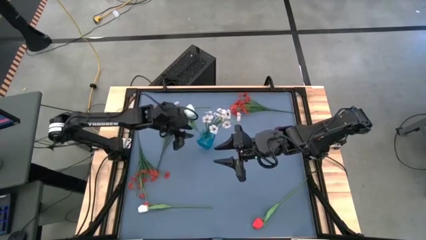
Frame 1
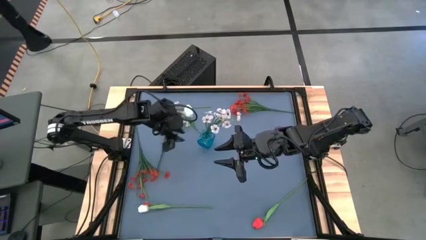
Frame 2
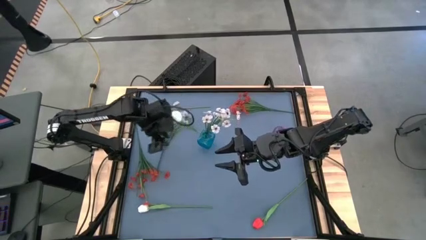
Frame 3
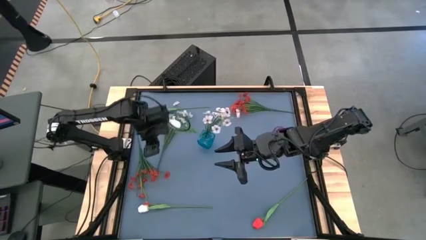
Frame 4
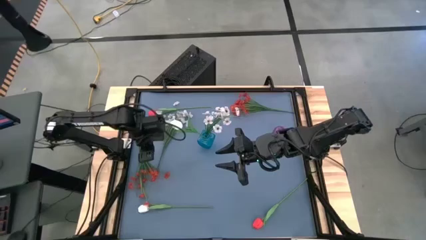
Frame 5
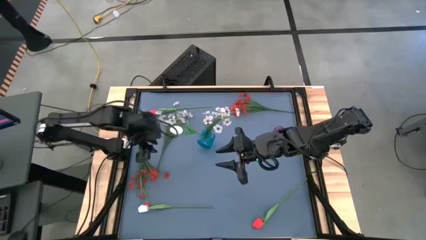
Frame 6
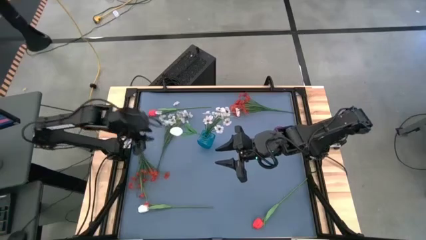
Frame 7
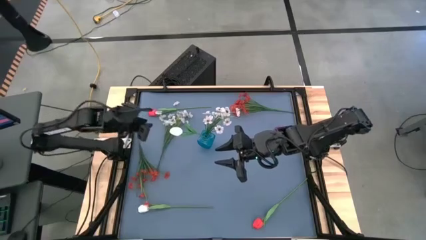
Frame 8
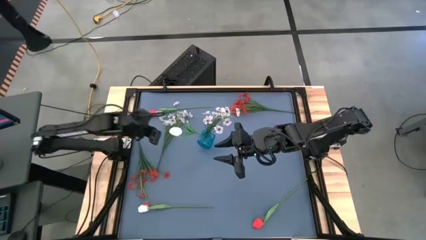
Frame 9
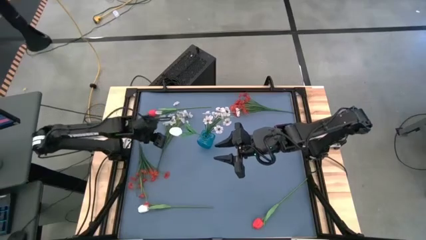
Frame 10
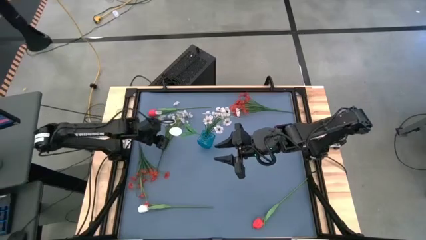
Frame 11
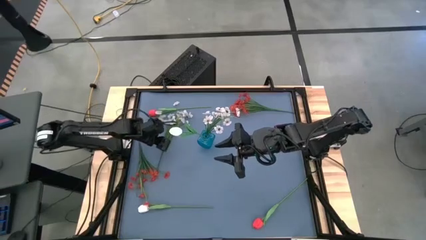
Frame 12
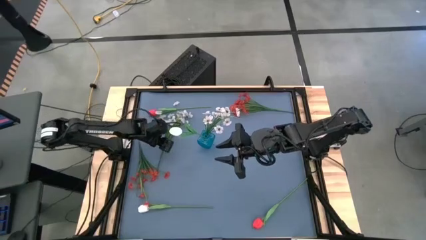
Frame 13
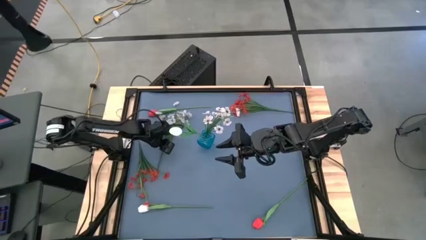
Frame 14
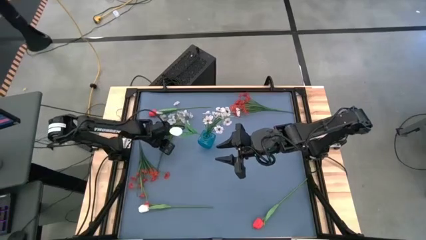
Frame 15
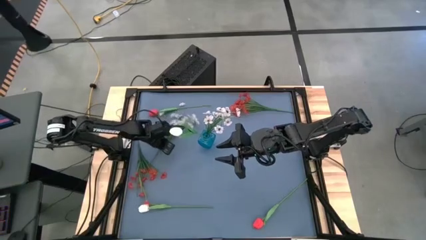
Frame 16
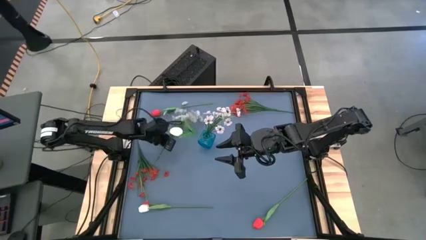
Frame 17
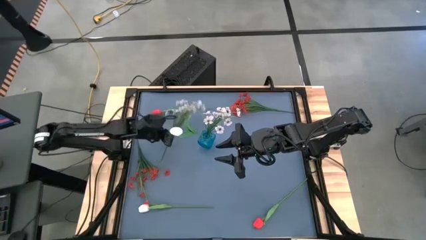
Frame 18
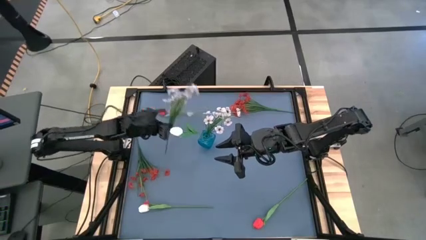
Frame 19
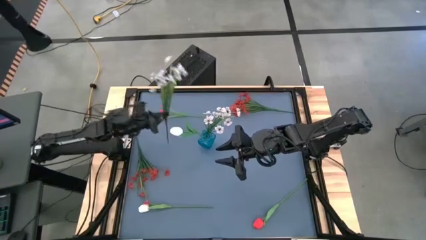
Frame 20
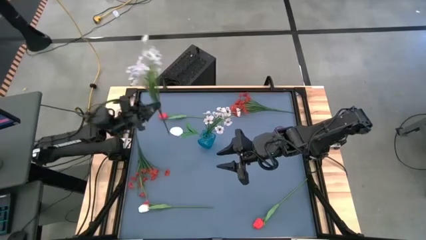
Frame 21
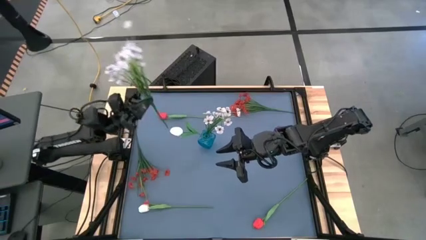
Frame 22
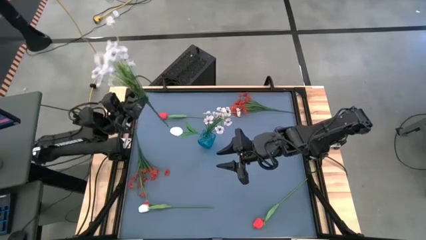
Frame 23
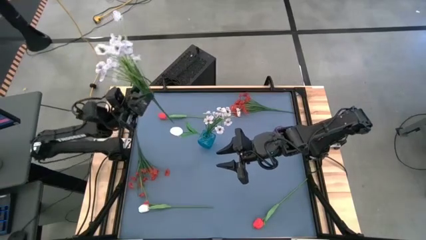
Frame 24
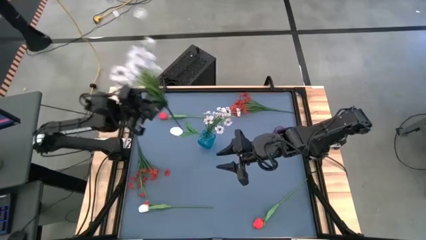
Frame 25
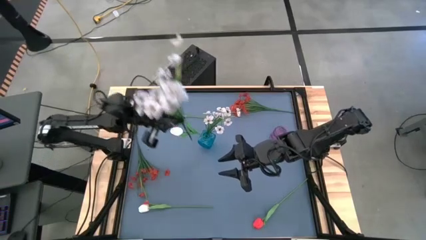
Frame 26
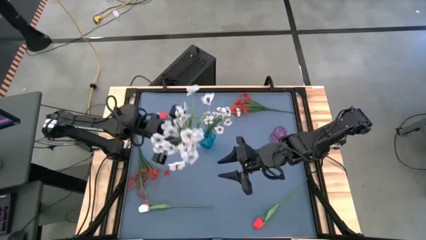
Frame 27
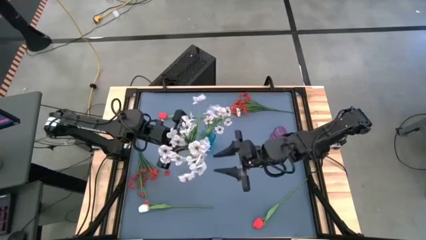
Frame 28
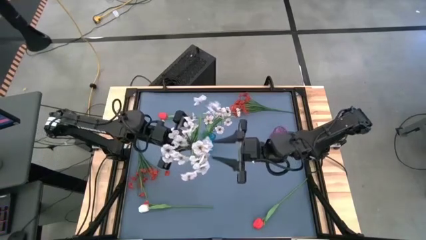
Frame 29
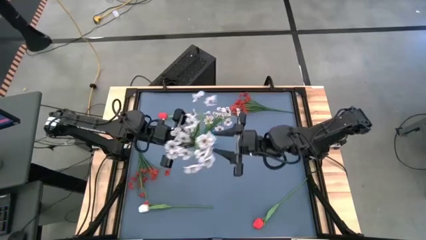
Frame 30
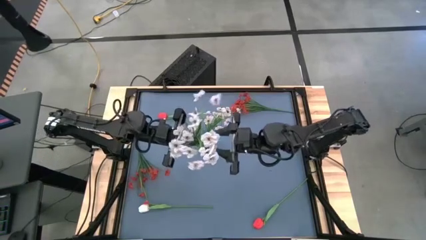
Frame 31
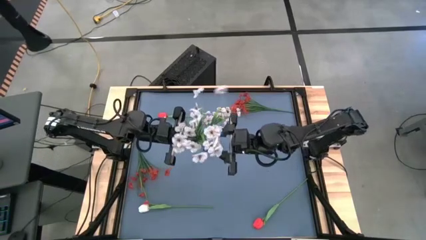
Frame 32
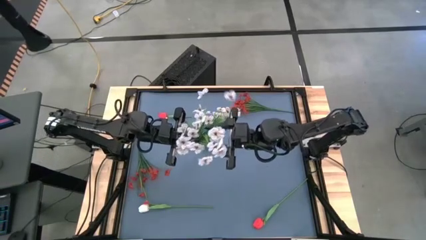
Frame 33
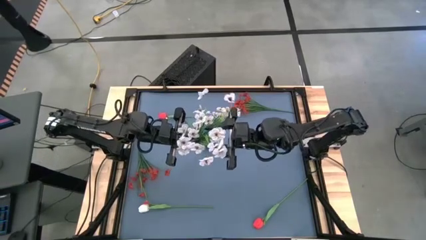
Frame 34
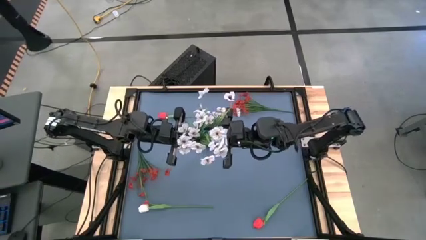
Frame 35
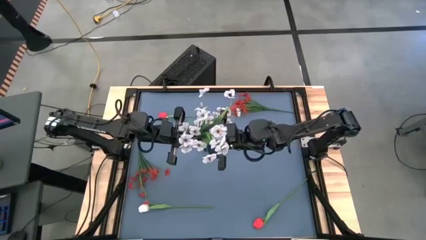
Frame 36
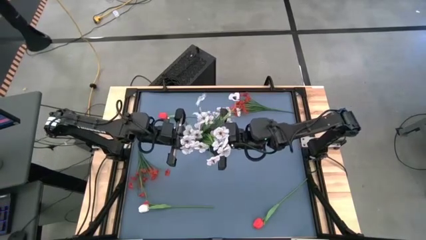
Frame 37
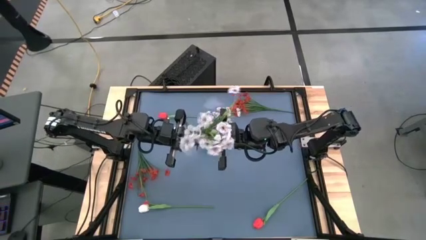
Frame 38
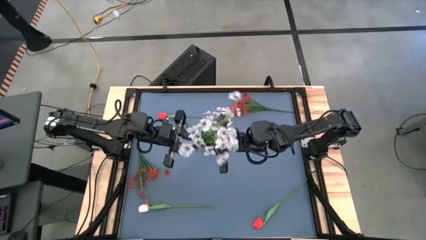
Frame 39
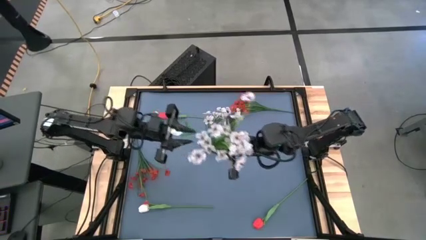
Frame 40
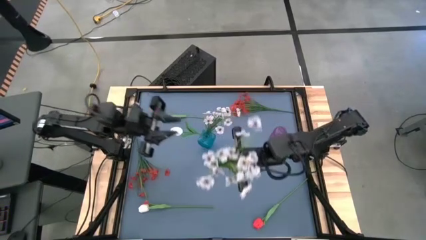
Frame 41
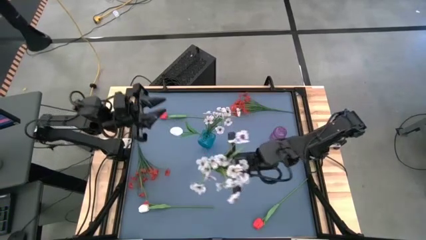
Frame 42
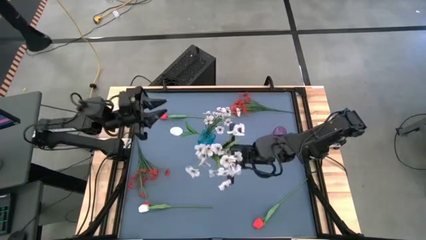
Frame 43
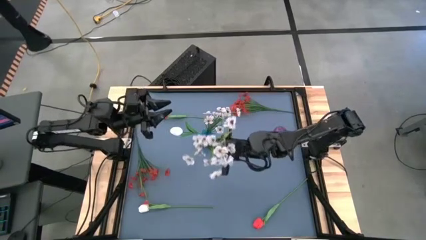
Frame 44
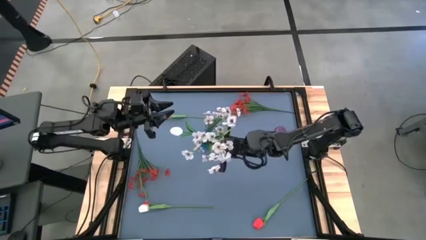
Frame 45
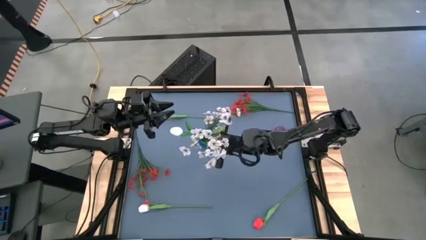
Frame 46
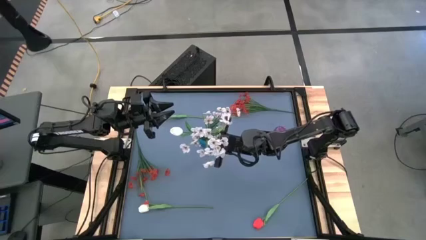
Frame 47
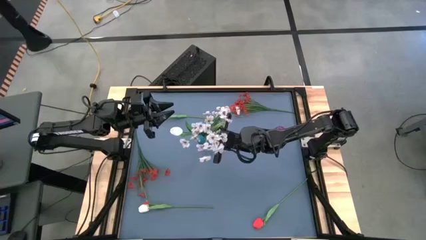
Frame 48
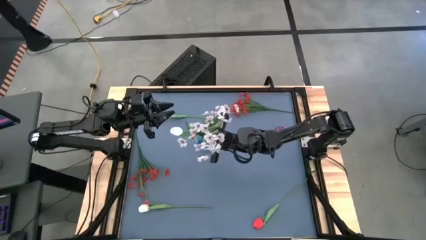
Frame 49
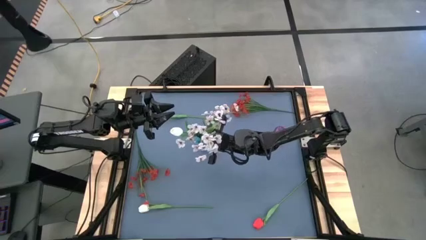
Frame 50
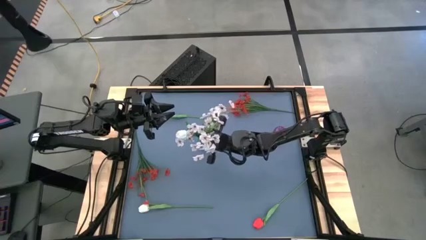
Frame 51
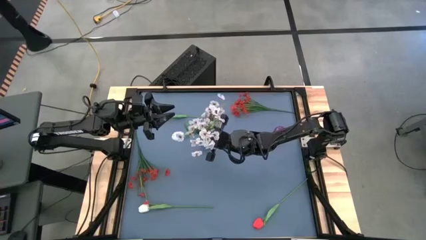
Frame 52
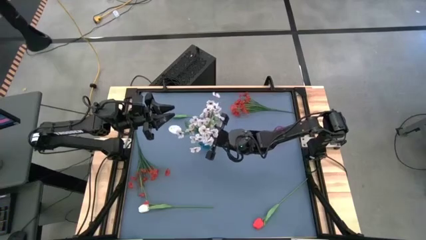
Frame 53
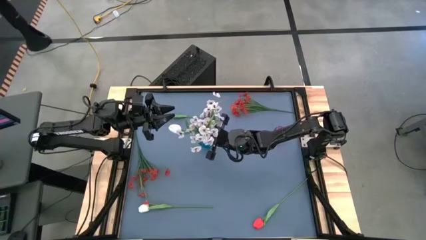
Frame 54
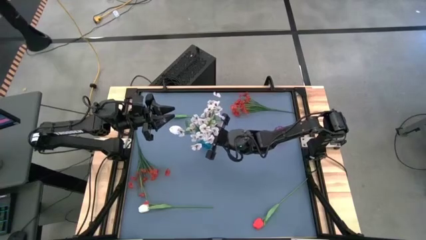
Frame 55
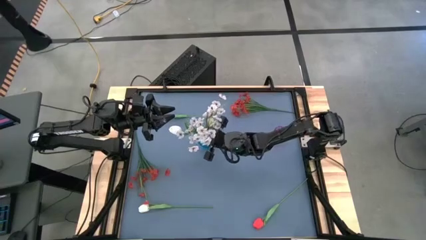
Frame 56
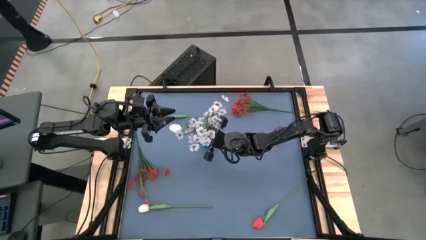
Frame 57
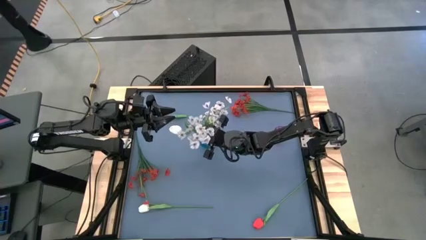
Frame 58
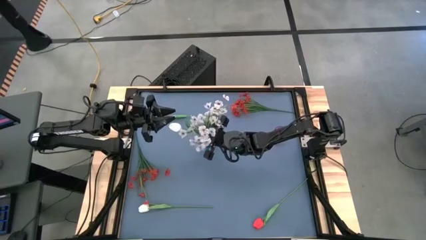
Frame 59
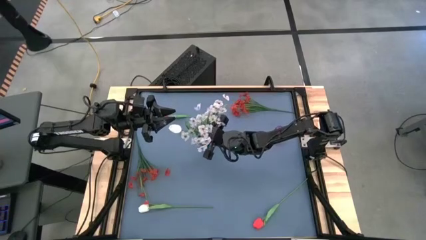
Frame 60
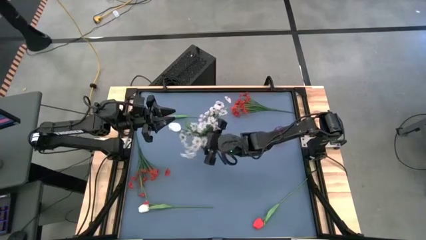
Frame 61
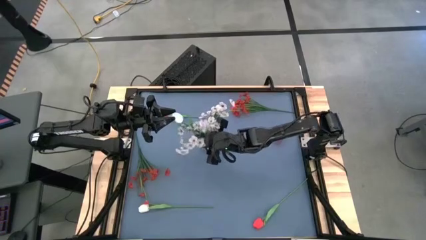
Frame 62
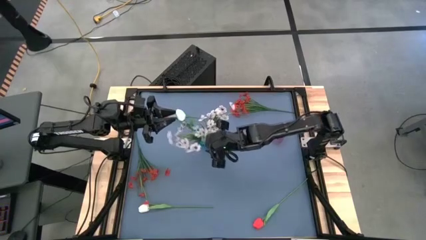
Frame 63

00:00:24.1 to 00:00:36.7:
Task: Sort flowers into vase by color
Put the white flowers into the blue vase

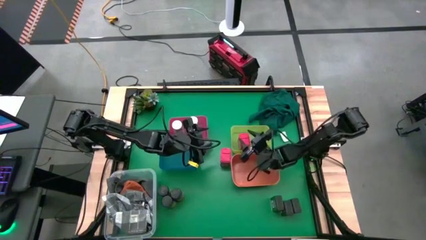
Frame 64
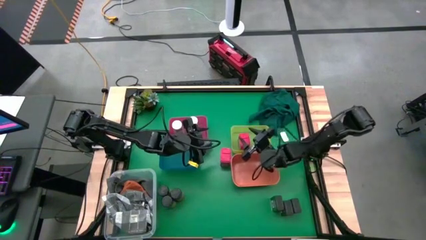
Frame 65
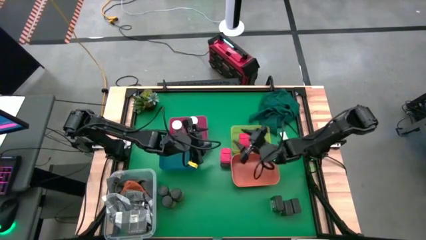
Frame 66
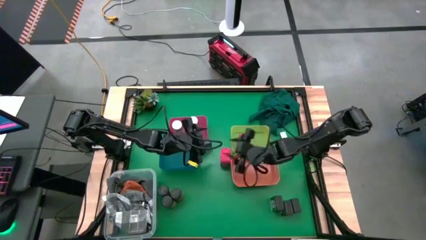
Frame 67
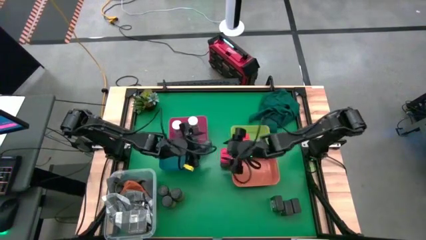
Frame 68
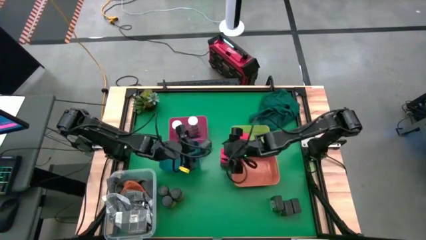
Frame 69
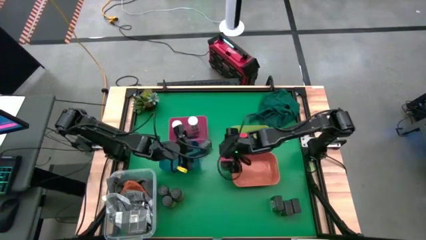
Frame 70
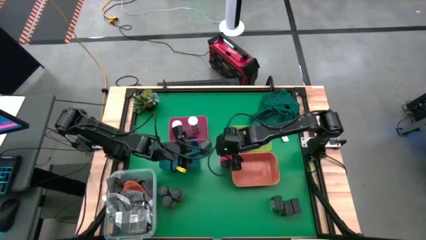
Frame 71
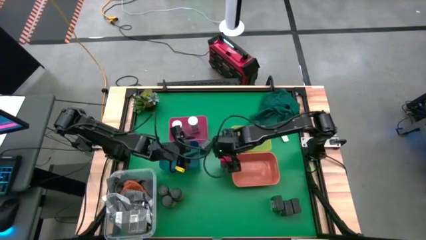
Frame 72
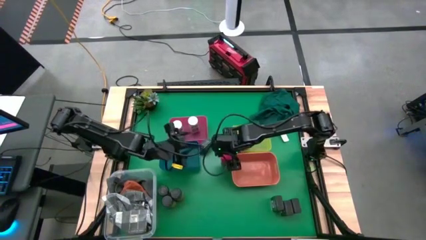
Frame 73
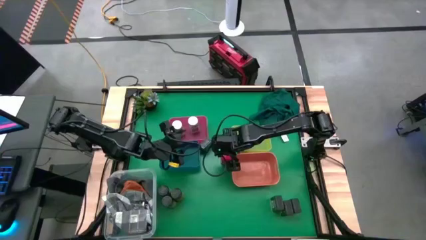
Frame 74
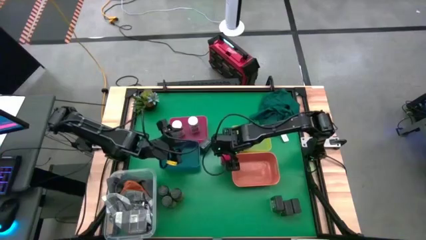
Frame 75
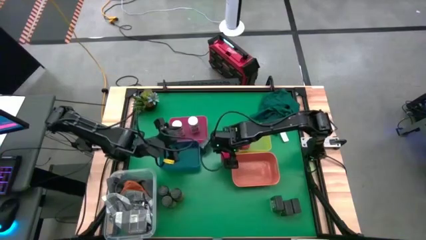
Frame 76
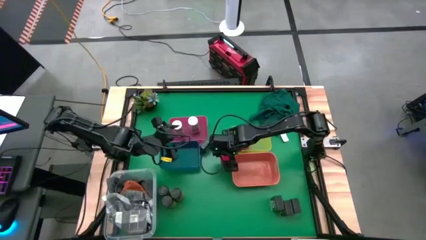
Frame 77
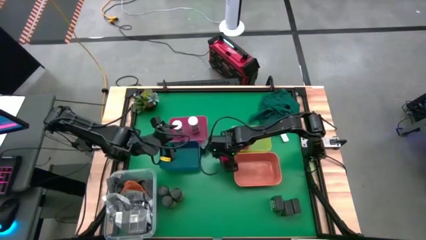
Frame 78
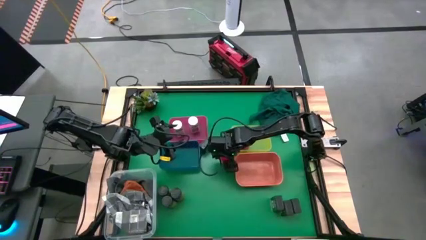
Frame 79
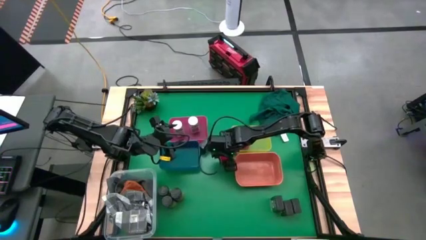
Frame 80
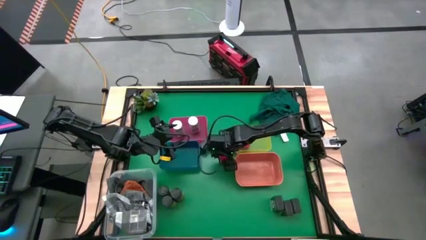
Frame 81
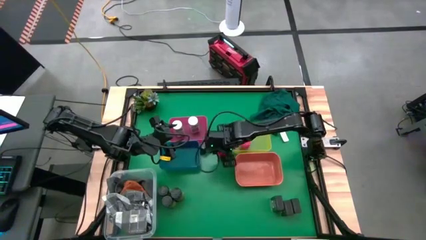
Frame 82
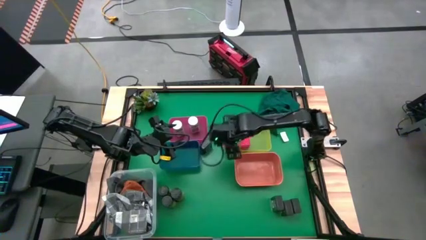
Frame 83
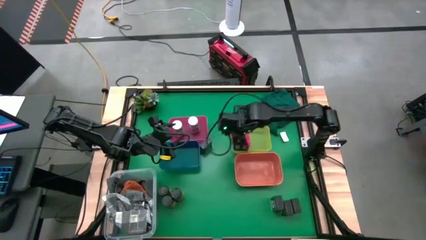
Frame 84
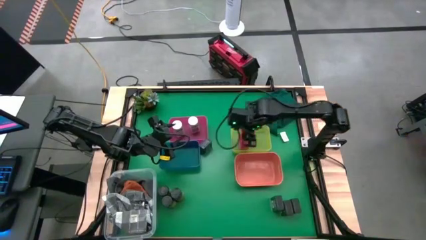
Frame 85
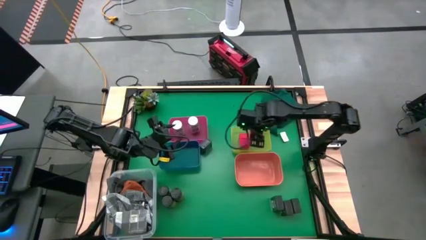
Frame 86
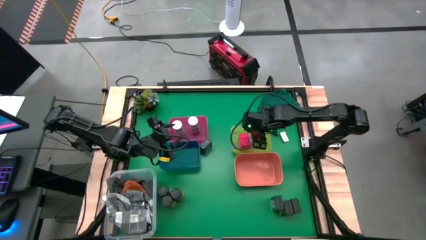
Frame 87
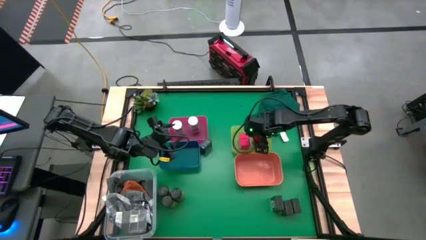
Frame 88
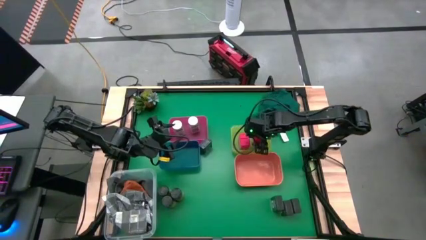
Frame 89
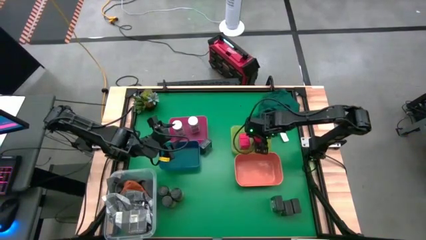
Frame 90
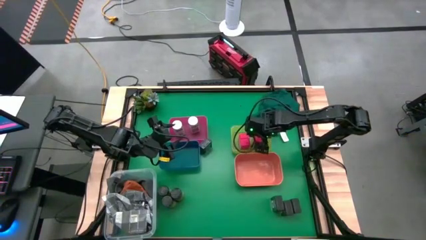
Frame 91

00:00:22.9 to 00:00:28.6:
Task: Sort spices by type
Put the red seasoning can into the yellow bin
